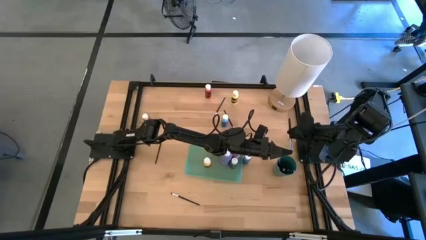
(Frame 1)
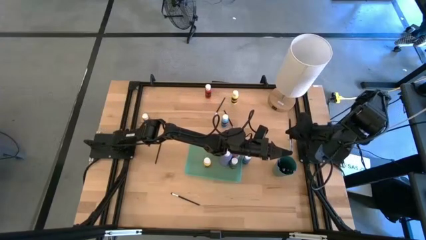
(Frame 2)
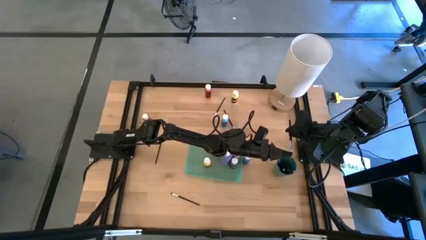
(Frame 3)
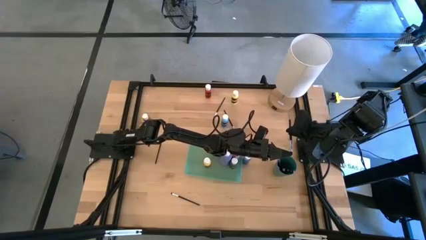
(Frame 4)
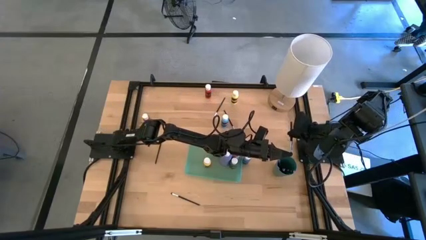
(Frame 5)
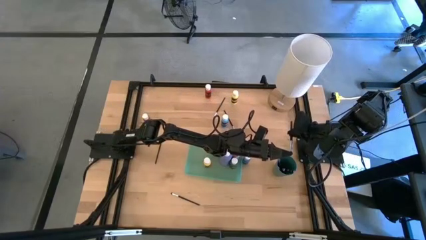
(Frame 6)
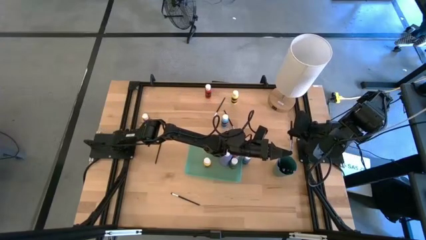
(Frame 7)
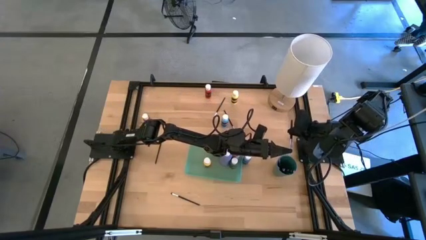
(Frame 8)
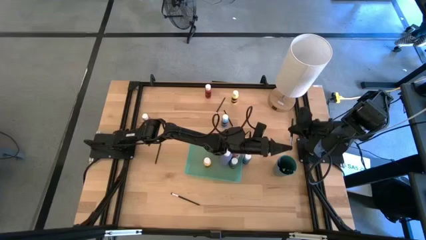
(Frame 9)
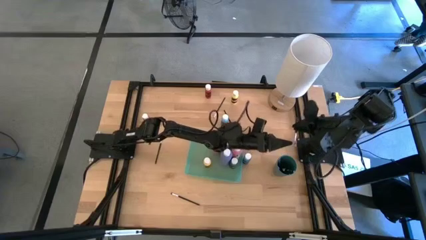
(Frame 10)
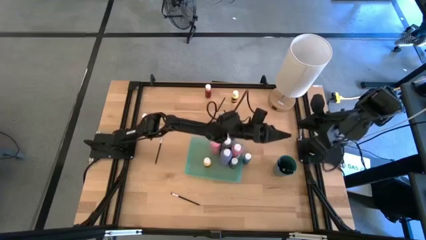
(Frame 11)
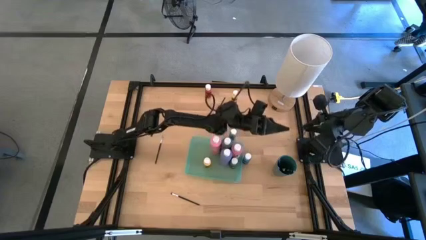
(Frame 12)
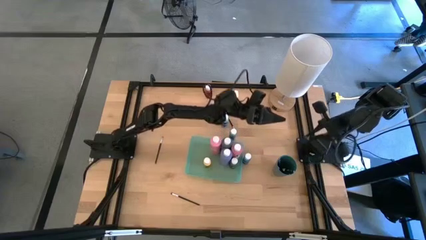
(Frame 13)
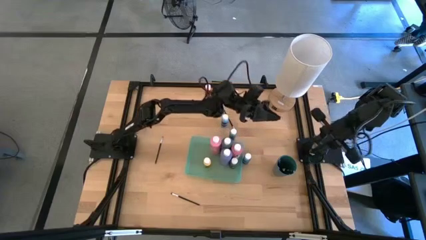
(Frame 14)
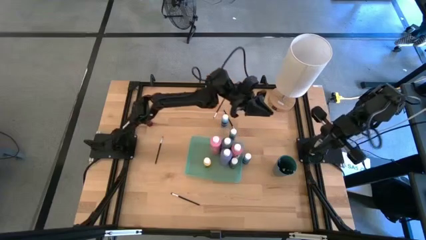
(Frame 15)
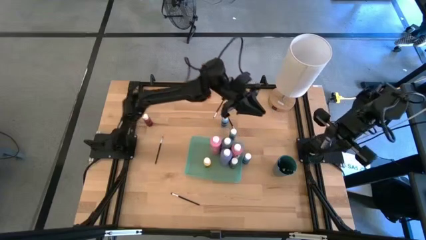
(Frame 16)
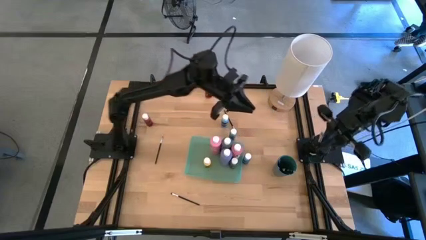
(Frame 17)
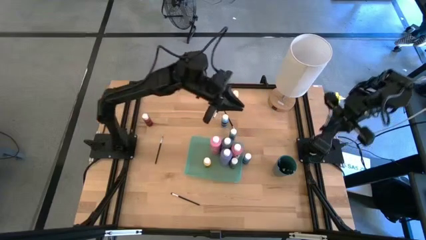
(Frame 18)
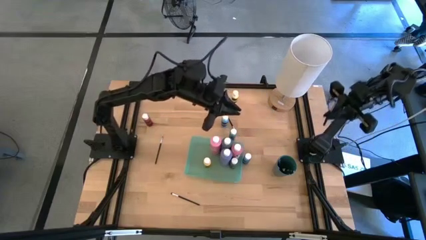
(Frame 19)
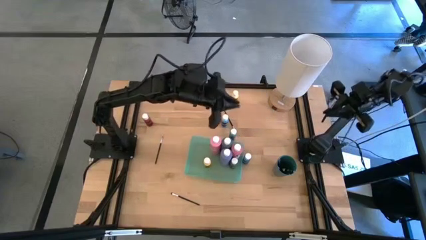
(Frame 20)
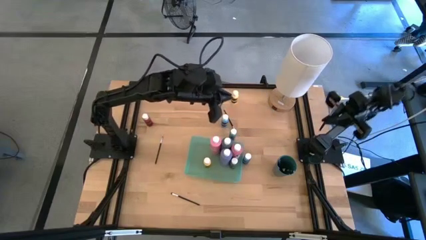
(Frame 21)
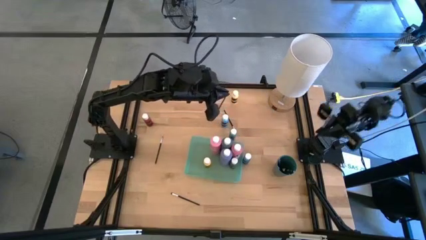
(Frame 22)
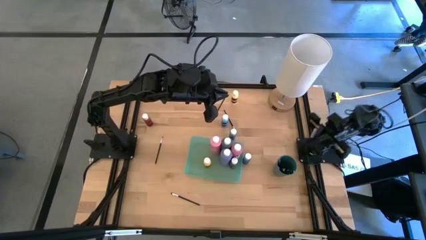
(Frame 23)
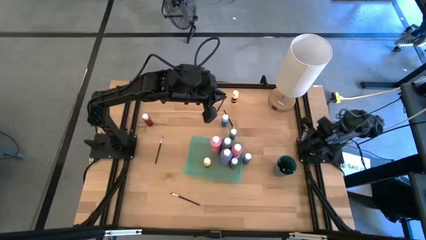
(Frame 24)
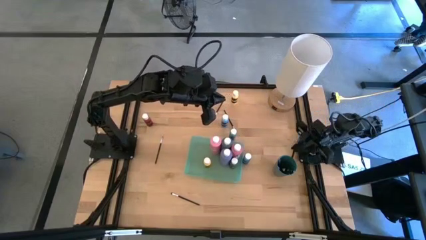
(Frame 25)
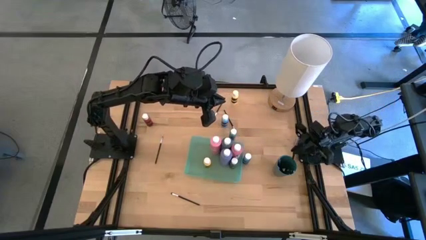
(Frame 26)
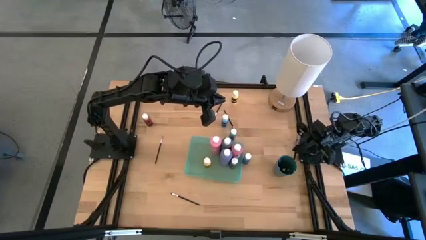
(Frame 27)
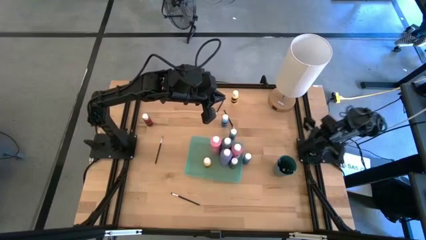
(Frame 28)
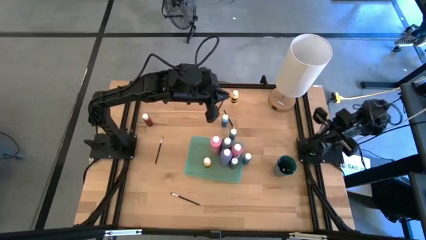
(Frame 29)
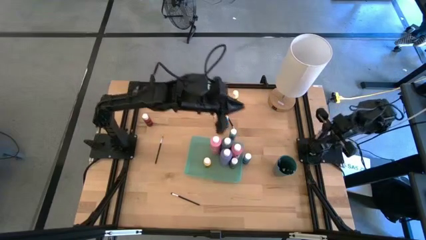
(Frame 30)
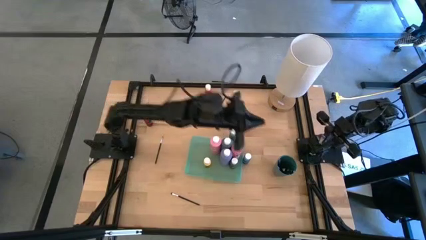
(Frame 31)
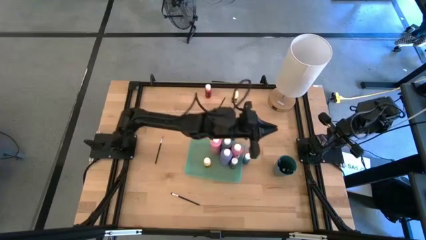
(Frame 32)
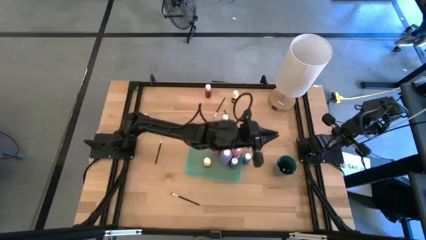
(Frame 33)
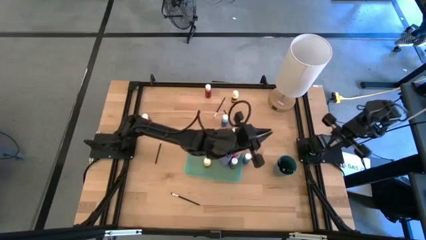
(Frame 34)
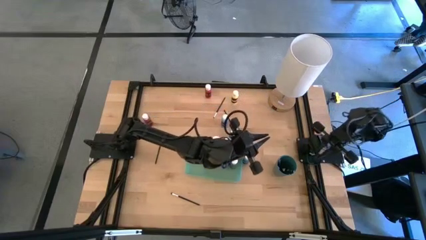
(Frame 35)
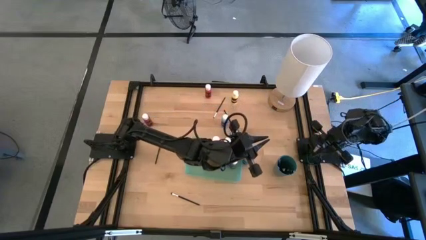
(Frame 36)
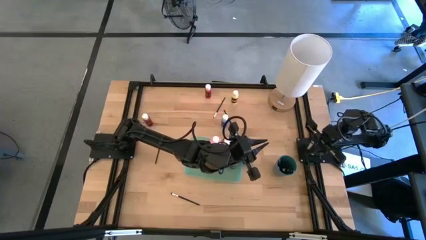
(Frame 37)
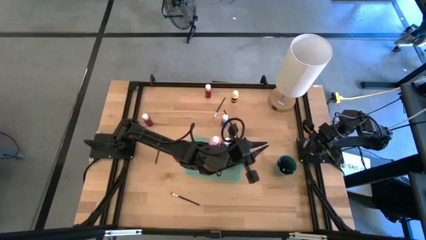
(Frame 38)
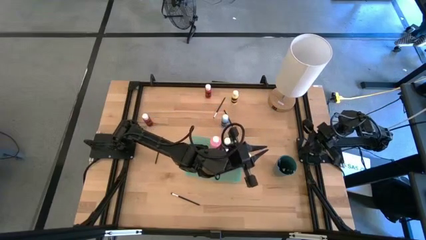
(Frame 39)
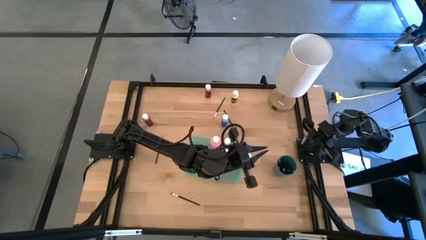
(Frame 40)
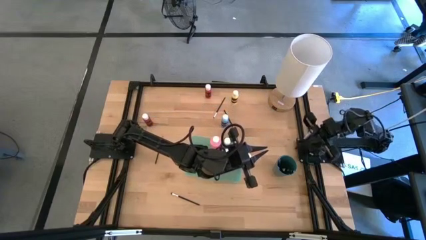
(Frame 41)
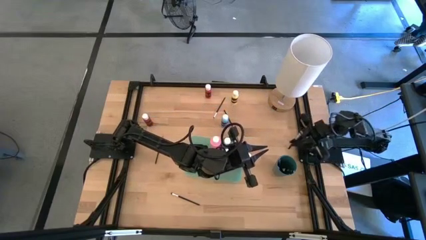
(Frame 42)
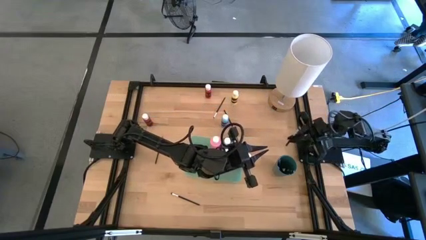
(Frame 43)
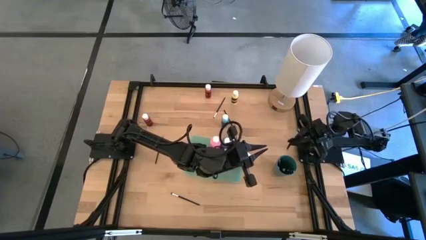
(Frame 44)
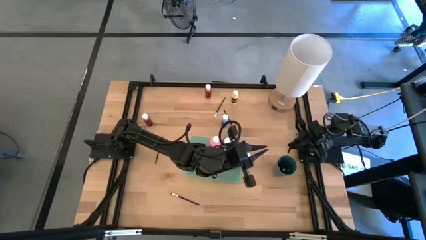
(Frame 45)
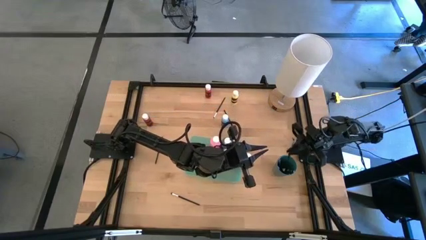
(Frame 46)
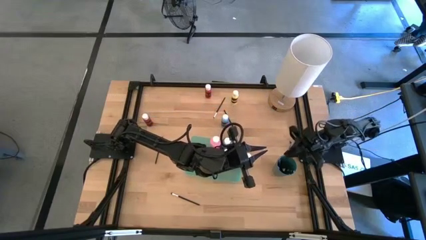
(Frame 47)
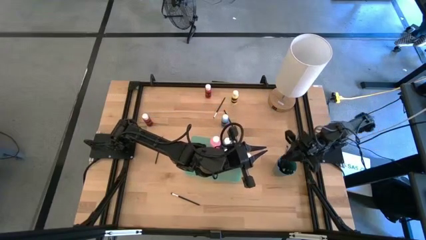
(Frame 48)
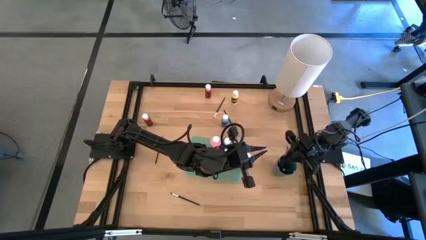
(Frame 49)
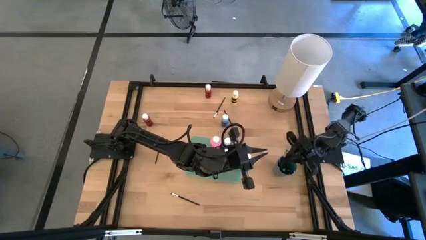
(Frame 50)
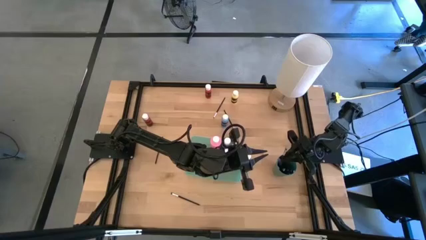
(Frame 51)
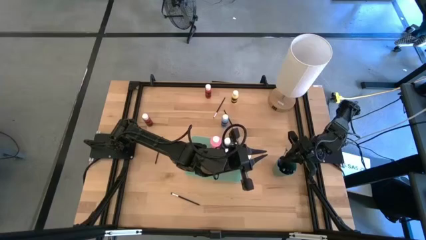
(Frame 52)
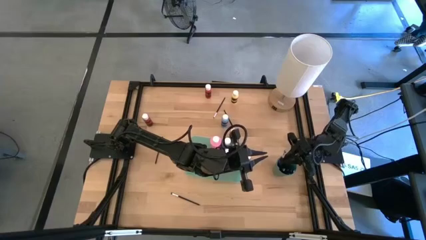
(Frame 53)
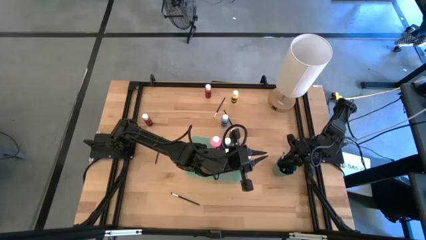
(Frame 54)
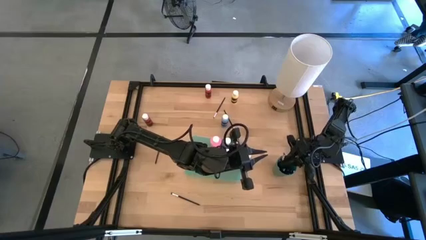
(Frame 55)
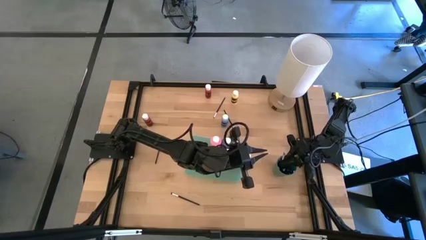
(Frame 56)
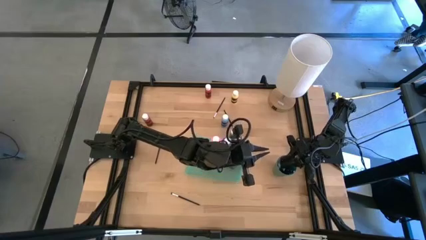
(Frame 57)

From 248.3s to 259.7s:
Task: Pick & Place Paint Supplies
Put the black eyeshadow brush into the green cup
